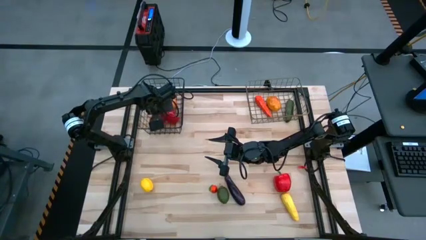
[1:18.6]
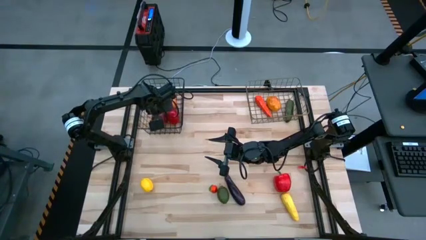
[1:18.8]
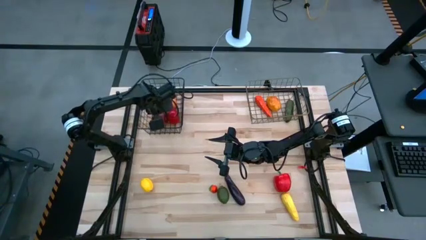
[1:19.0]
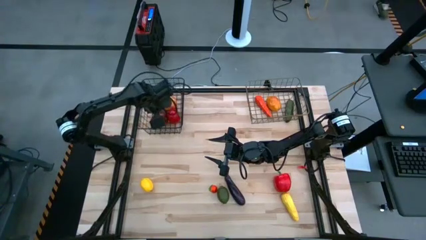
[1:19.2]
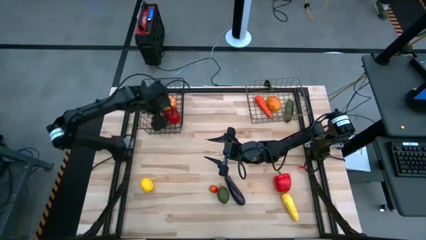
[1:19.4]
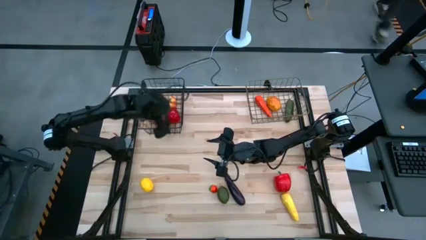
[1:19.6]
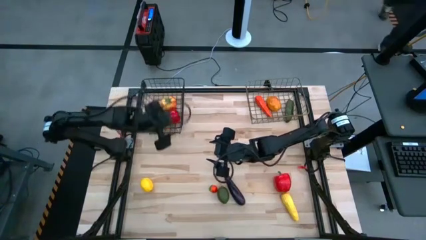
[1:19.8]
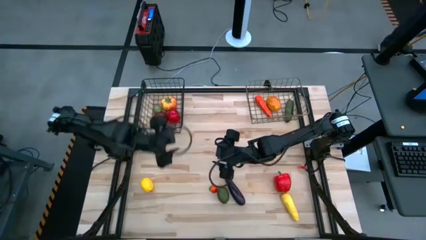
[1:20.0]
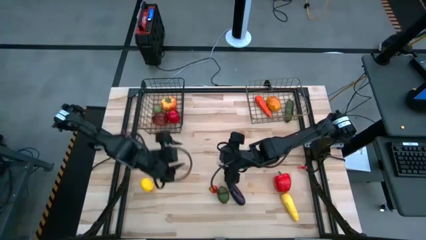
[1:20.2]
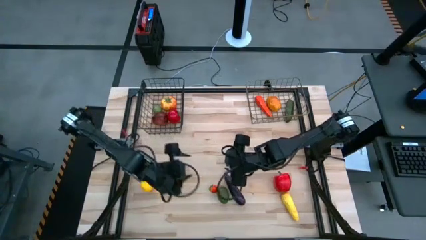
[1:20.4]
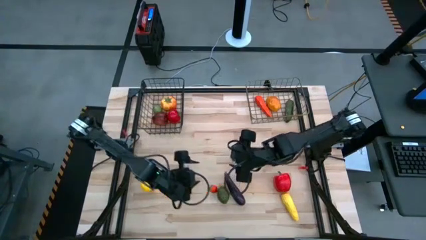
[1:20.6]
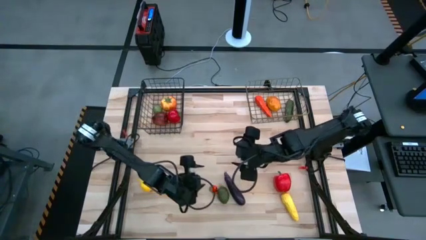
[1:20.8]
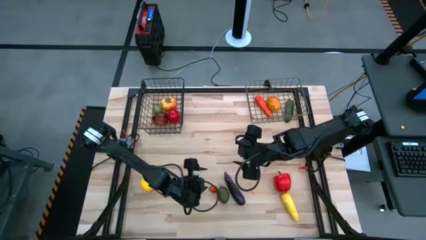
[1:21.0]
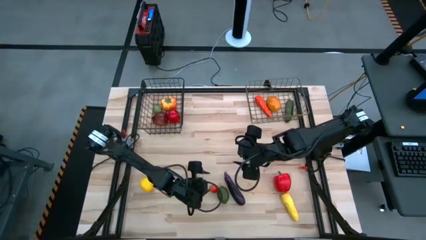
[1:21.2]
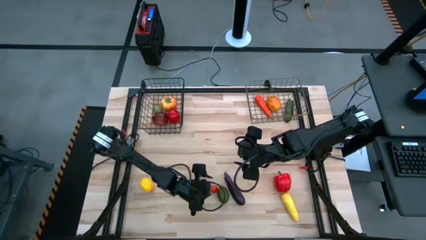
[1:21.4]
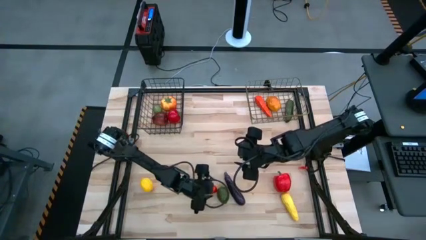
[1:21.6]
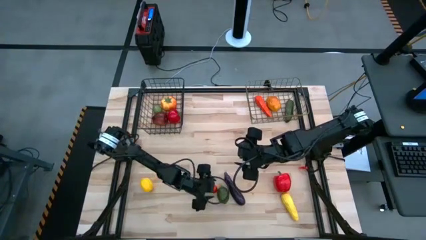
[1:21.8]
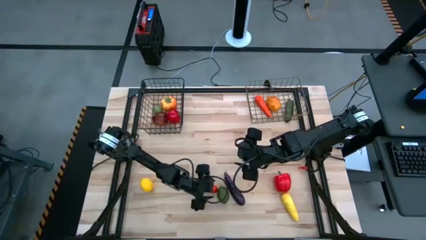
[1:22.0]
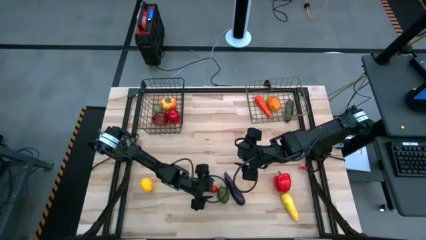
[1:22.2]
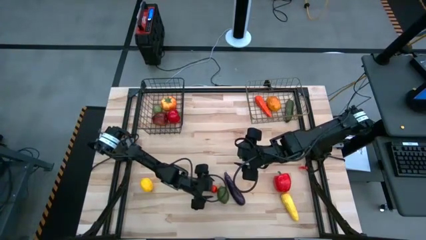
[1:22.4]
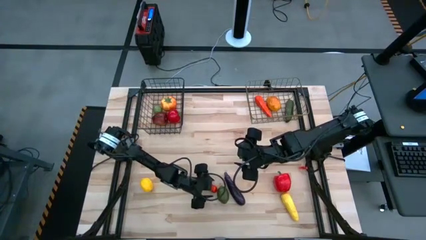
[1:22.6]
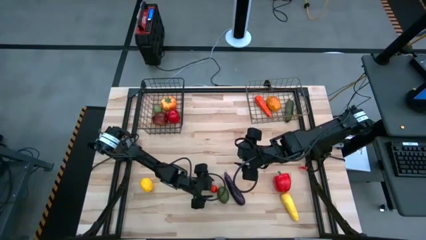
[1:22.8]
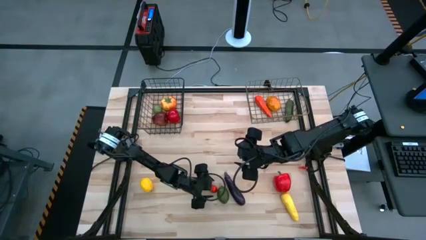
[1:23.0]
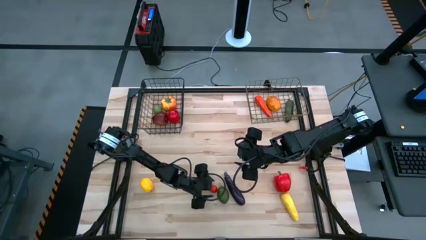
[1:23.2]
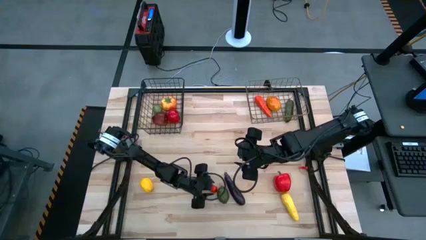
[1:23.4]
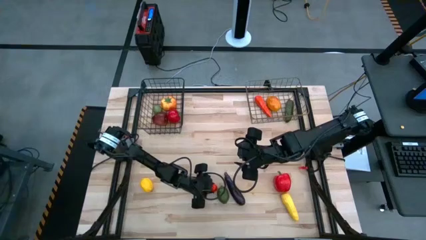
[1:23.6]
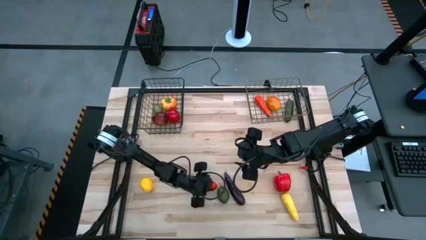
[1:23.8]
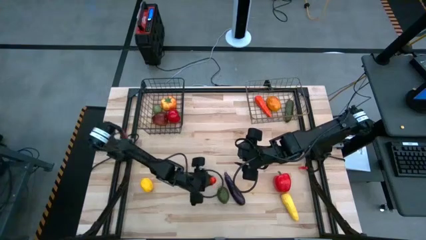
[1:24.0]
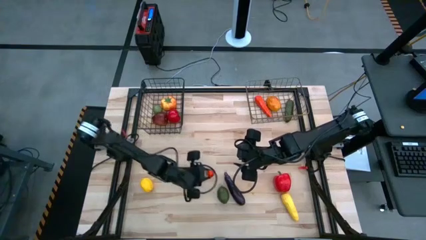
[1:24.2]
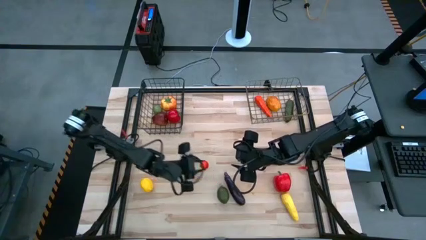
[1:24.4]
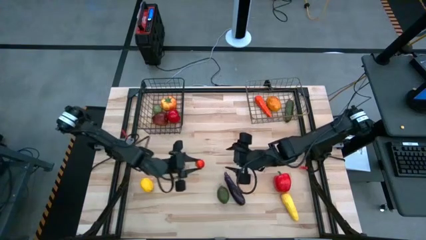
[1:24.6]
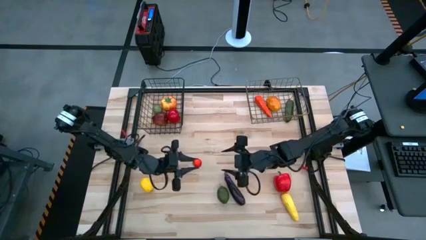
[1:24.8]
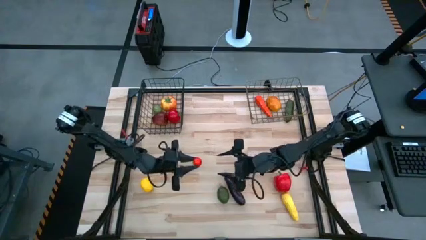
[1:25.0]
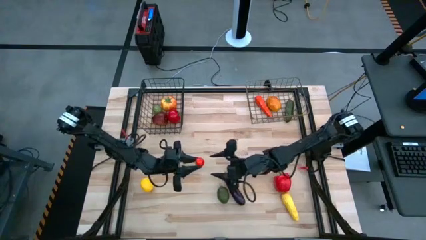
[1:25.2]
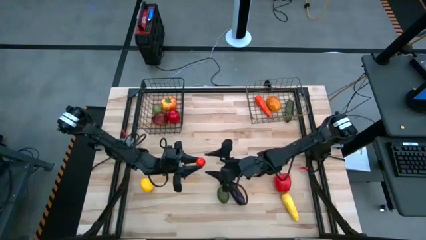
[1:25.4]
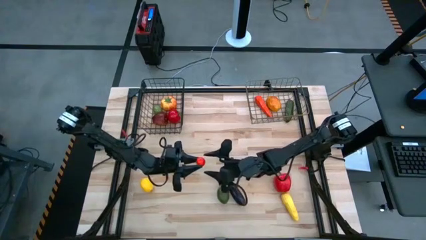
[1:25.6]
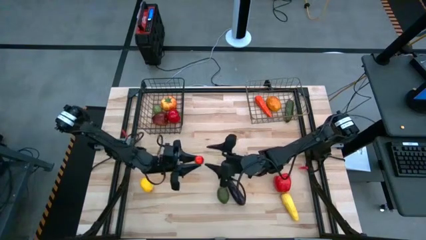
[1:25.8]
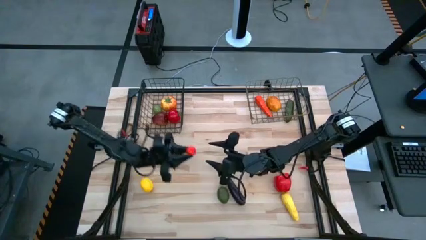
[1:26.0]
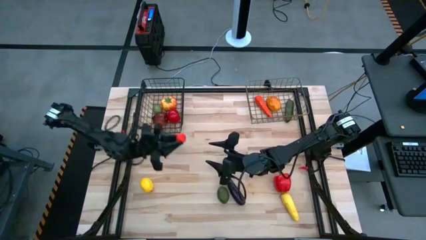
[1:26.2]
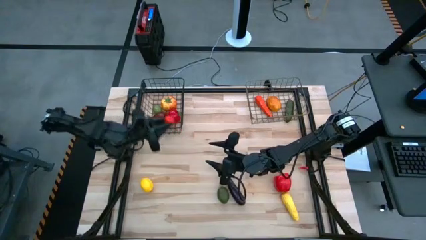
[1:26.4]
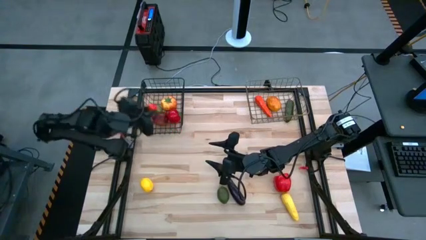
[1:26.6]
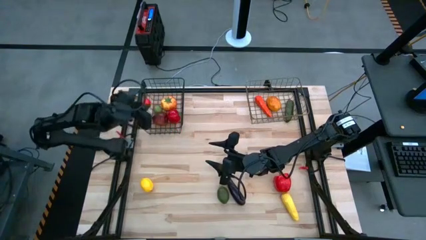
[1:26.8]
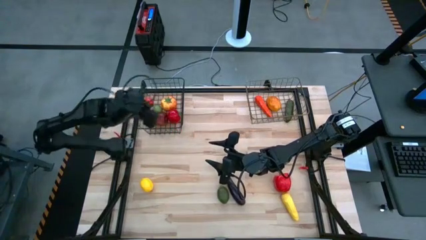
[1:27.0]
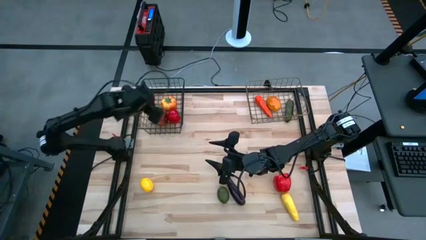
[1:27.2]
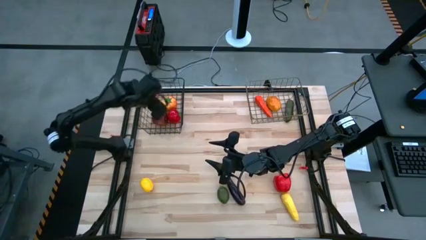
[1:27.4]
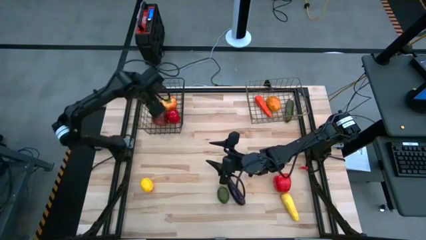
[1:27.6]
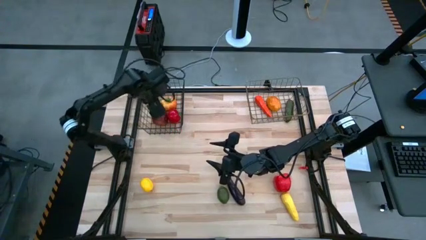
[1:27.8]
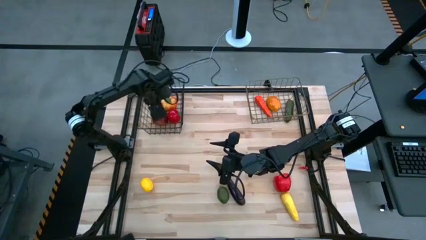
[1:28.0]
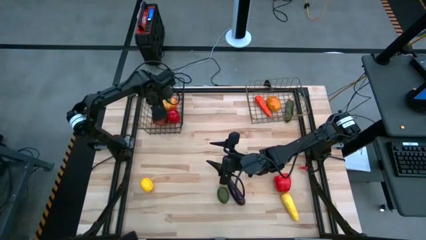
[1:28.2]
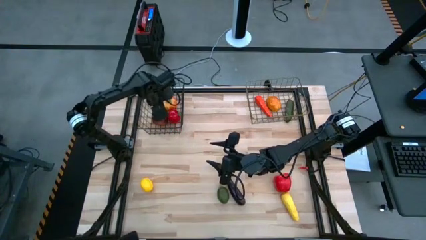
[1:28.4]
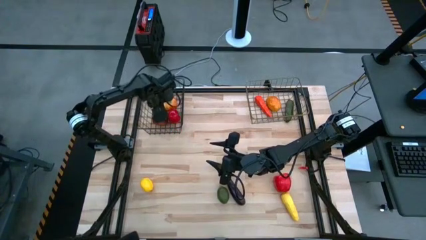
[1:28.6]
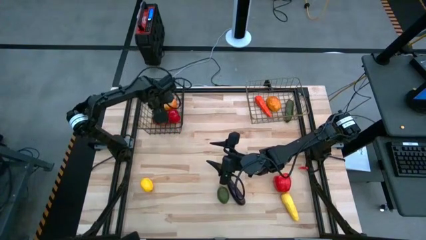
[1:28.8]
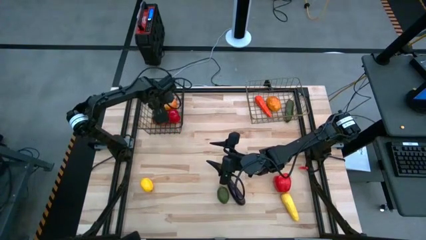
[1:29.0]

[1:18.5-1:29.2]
Task: Sort produce into baskets
Put the red tomato into the left wire basket

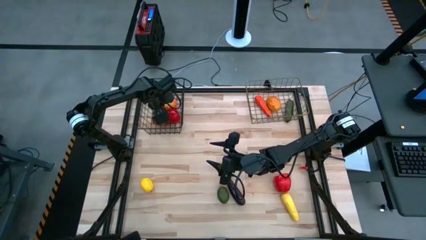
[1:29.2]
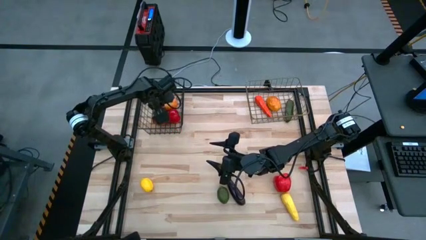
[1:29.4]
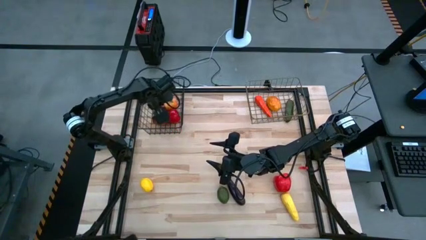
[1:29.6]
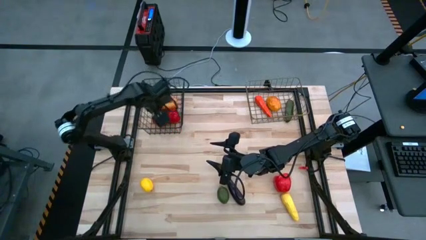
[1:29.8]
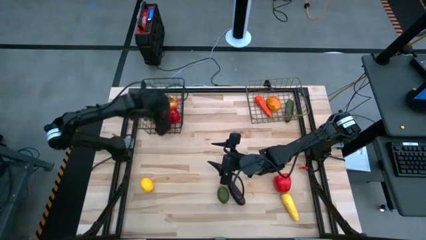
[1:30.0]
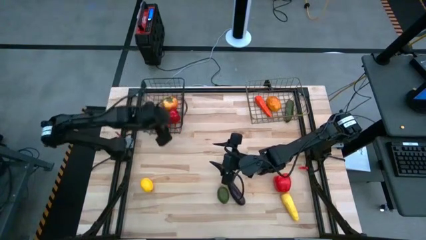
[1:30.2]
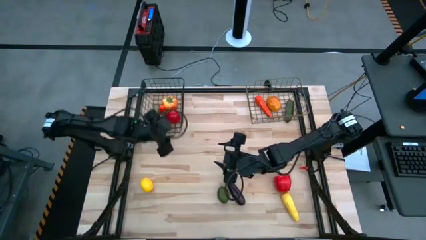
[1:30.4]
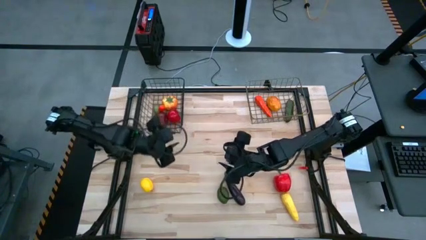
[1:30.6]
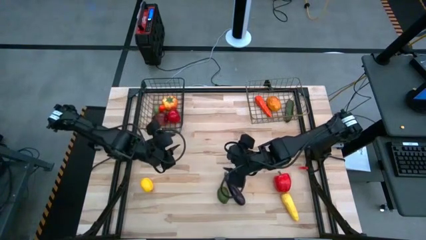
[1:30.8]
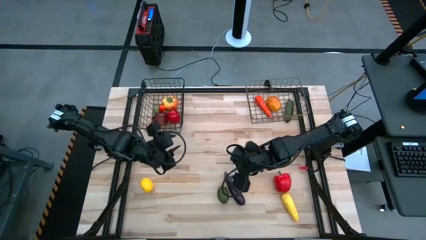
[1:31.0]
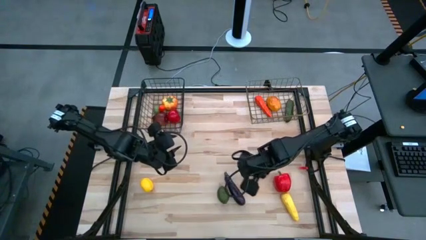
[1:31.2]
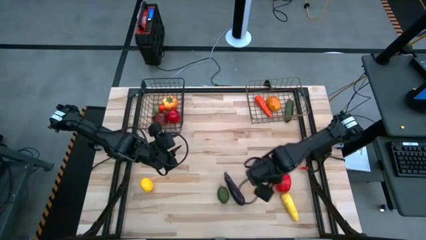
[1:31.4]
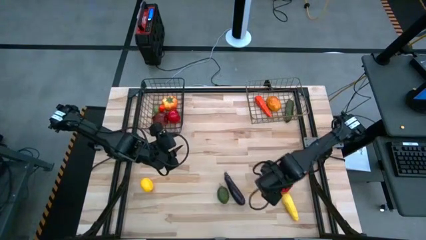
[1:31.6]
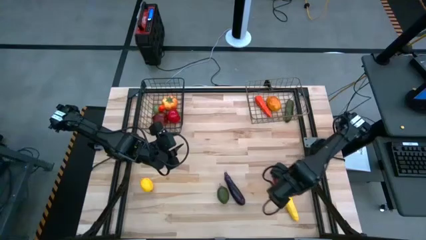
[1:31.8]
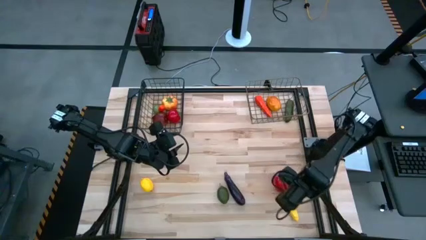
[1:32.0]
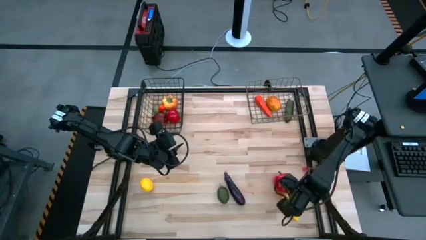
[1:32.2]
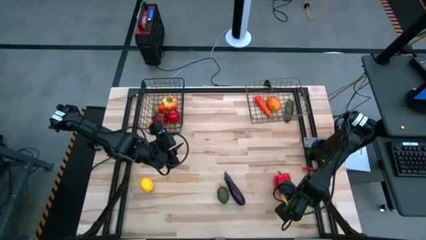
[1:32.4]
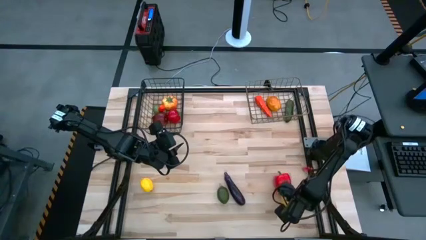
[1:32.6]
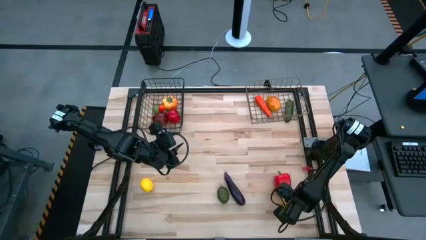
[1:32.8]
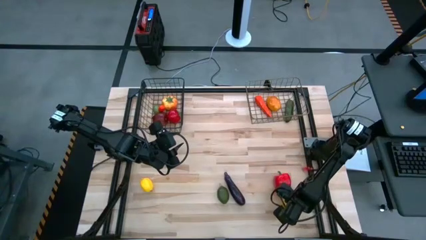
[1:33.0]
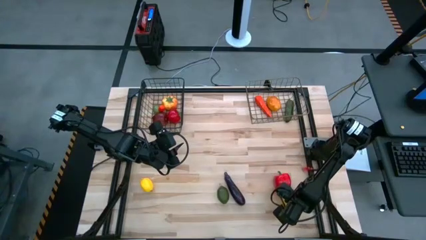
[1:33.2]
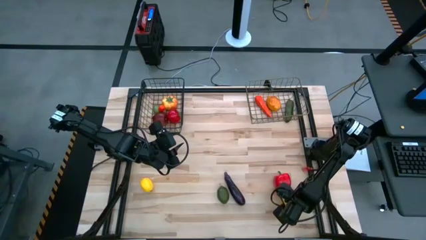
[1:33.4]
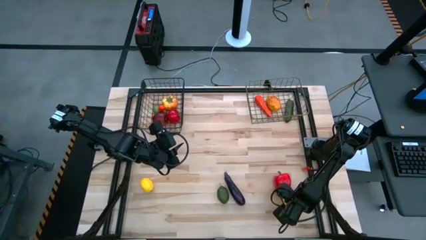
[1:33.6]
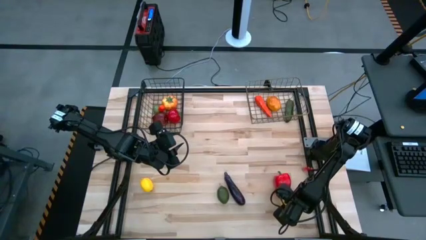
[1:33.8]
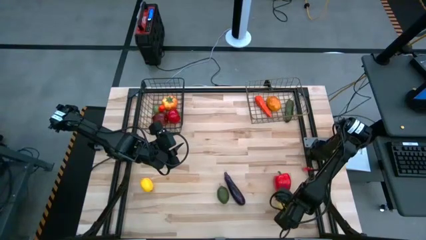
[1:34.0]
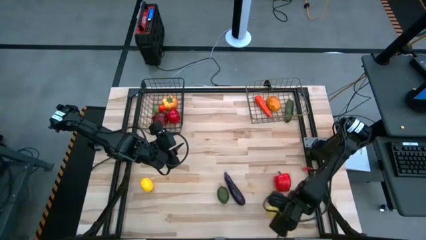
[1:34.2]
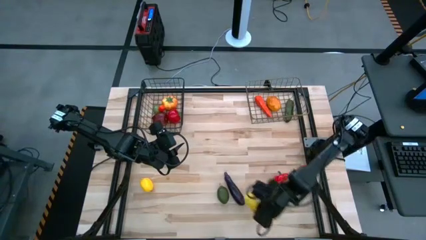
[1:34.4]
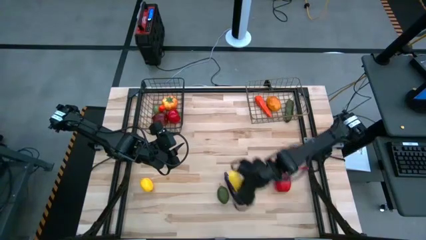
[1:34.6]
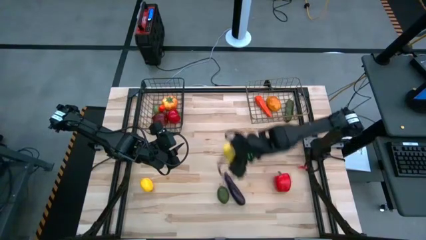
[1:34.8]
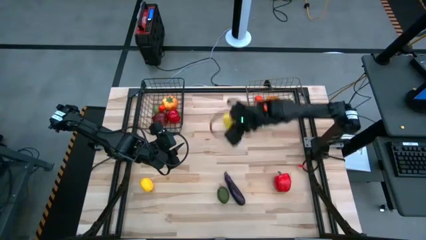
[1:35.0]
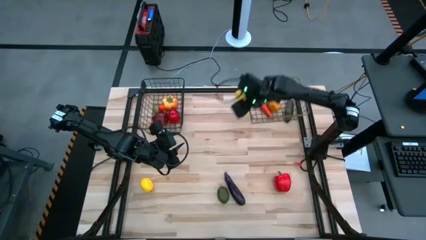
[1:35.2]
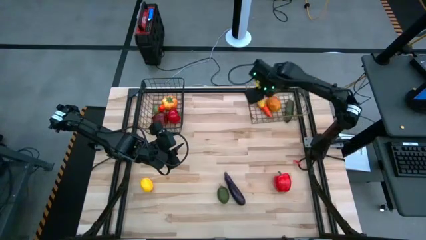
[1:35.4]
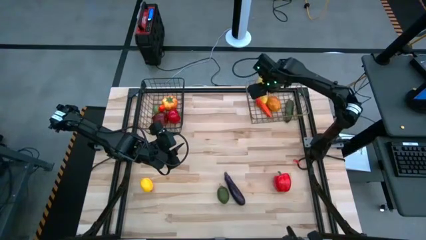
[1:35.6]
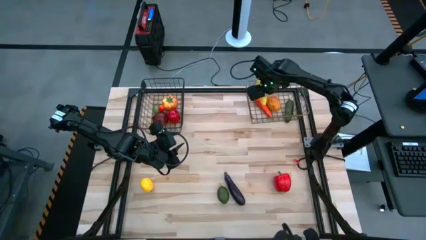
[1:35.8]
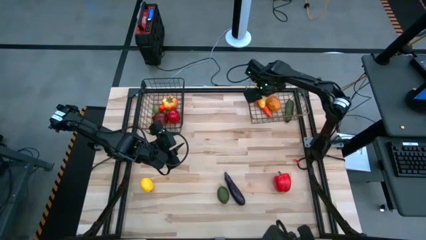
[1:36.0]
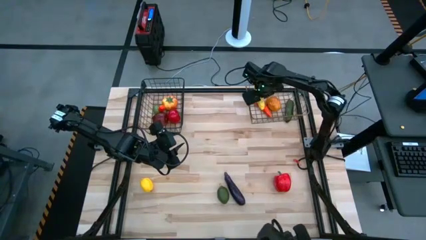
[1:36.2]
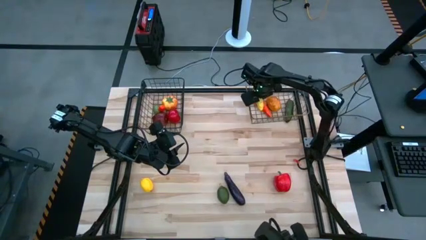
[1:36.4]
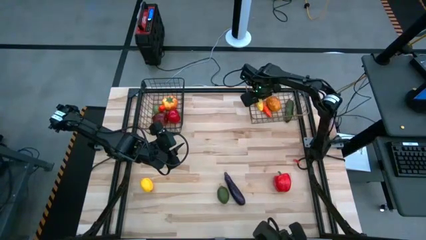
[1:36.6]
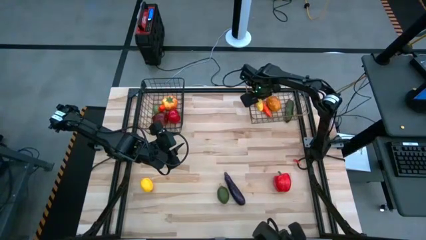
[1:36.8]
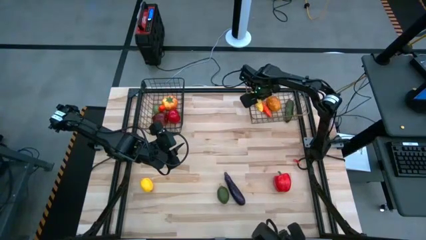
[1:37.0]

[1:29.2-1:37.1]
Put the corn into the right wire basket
